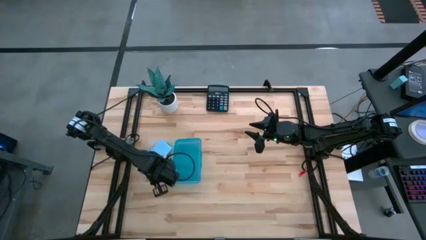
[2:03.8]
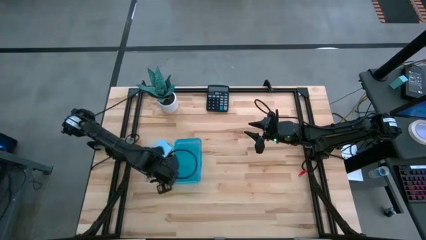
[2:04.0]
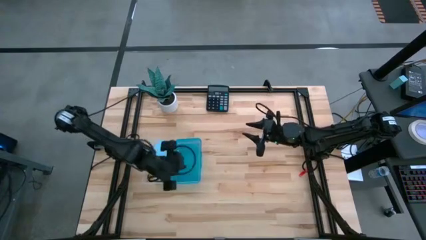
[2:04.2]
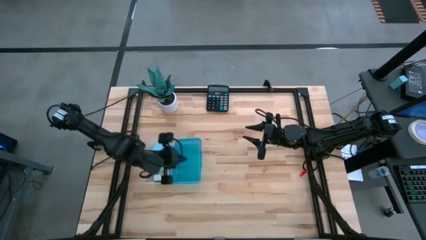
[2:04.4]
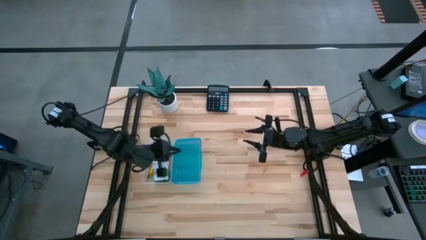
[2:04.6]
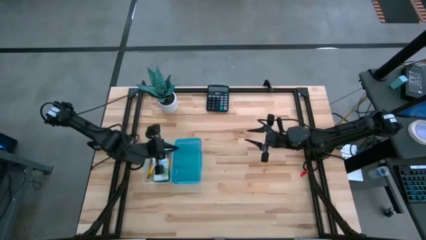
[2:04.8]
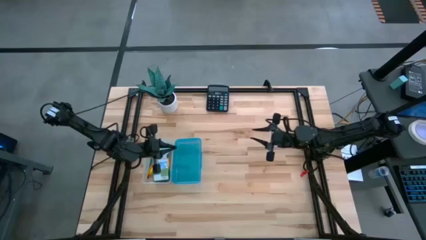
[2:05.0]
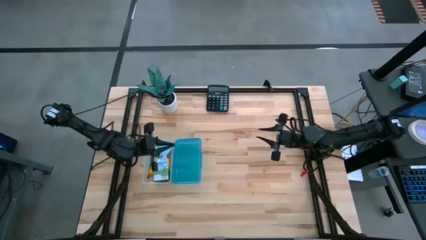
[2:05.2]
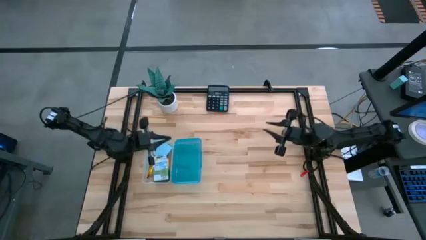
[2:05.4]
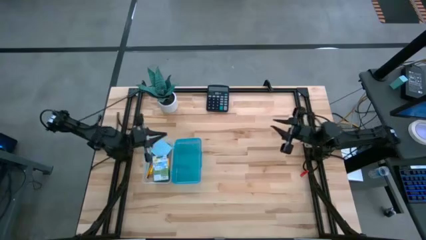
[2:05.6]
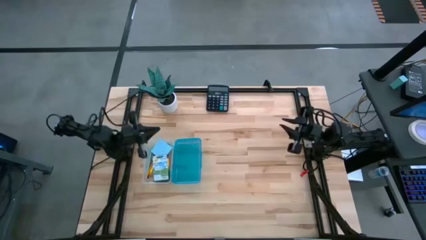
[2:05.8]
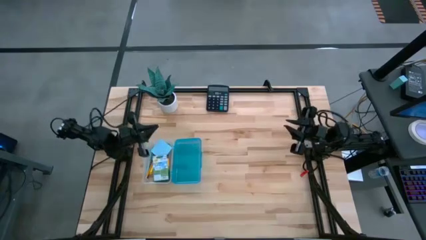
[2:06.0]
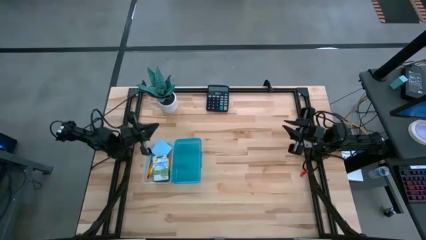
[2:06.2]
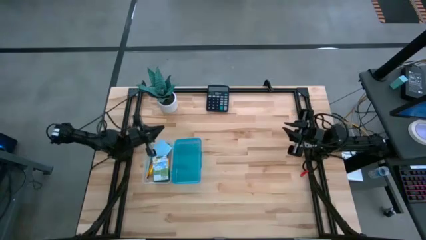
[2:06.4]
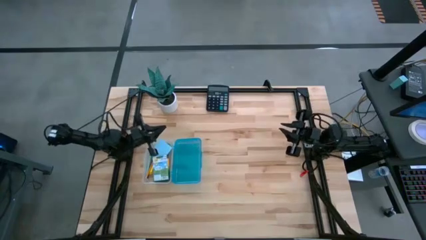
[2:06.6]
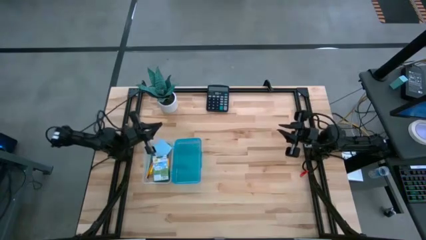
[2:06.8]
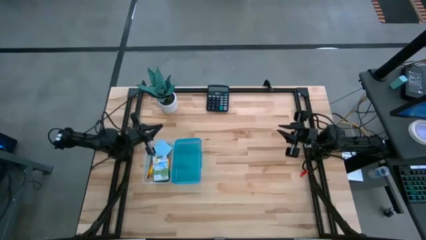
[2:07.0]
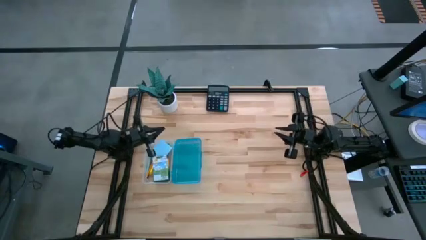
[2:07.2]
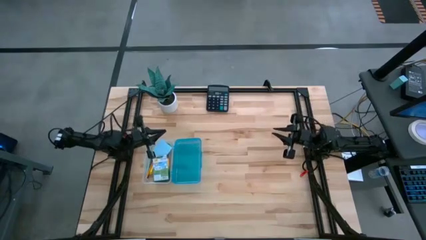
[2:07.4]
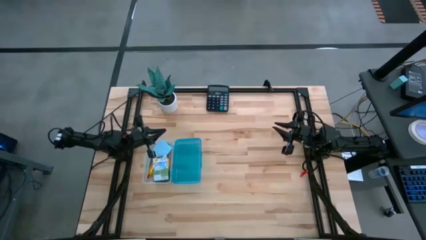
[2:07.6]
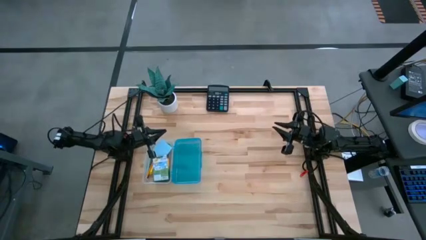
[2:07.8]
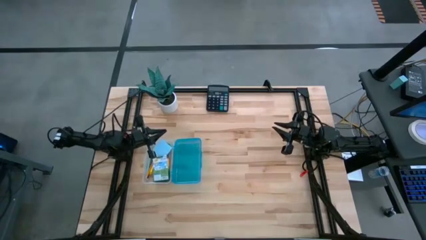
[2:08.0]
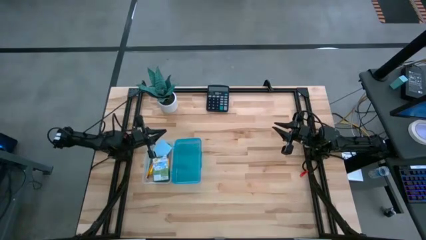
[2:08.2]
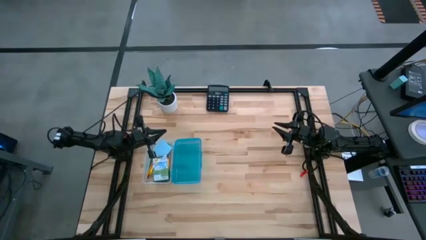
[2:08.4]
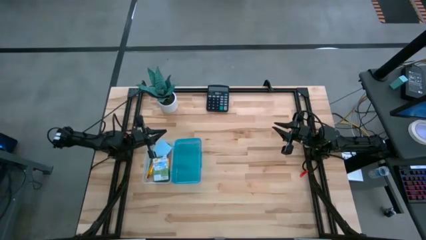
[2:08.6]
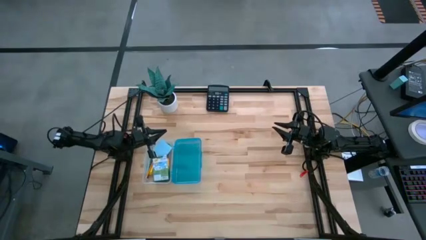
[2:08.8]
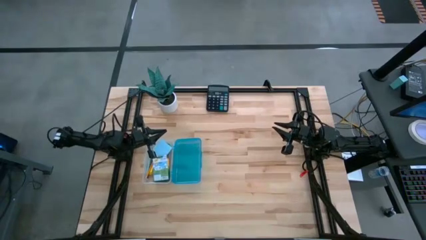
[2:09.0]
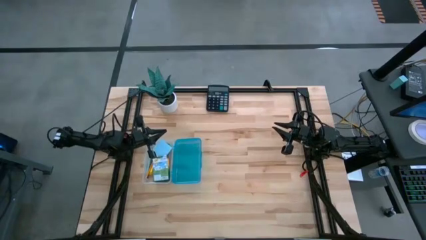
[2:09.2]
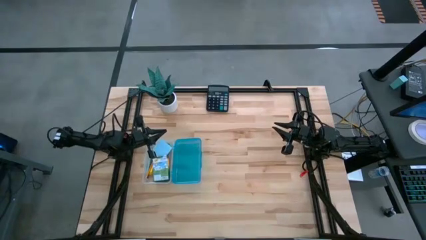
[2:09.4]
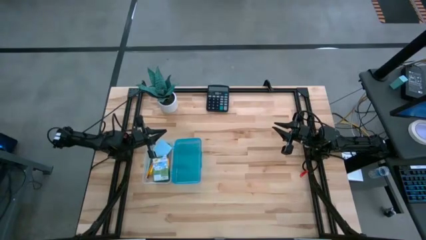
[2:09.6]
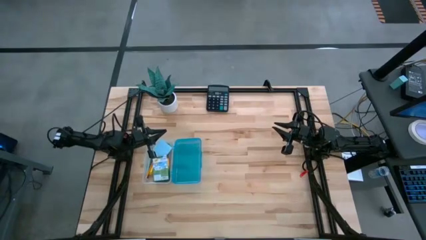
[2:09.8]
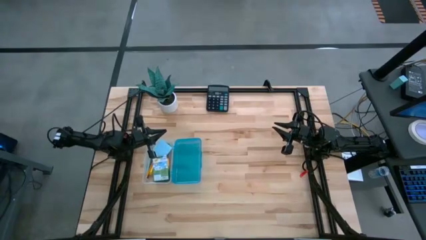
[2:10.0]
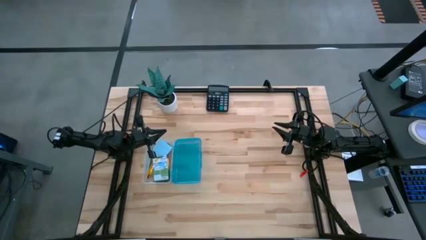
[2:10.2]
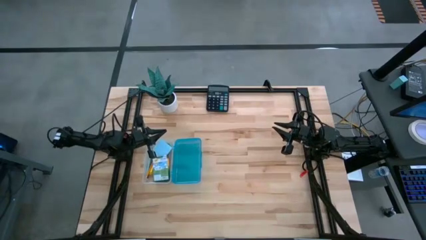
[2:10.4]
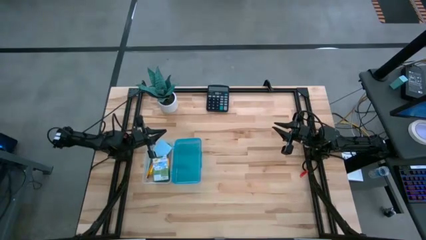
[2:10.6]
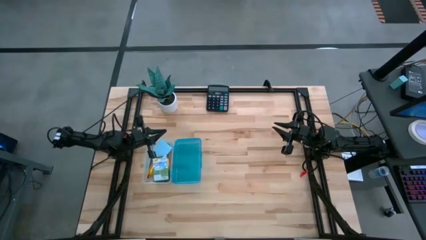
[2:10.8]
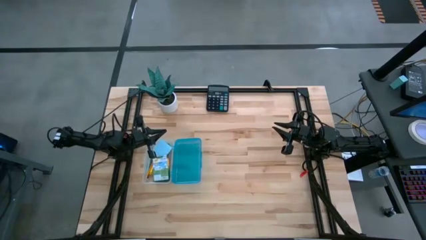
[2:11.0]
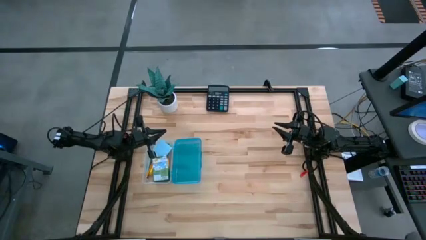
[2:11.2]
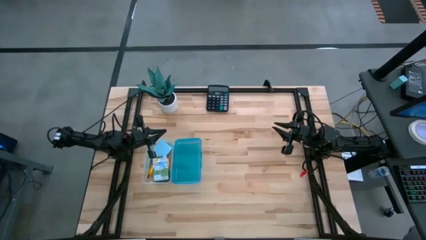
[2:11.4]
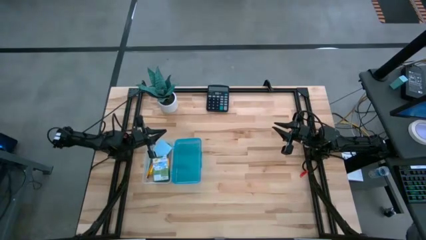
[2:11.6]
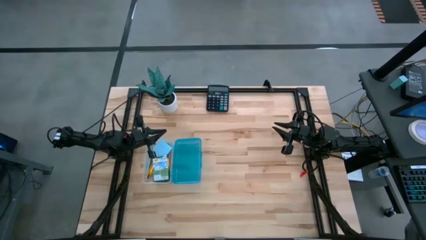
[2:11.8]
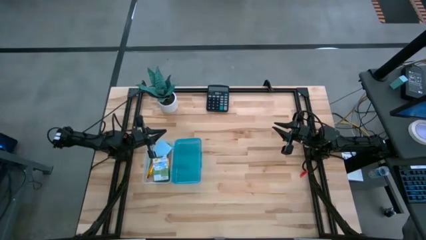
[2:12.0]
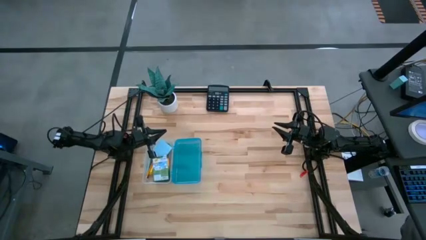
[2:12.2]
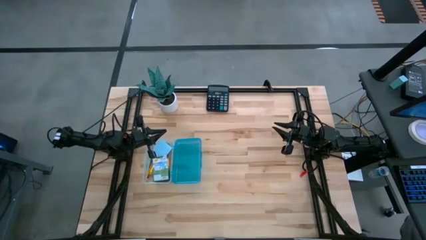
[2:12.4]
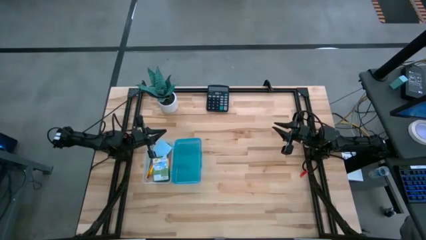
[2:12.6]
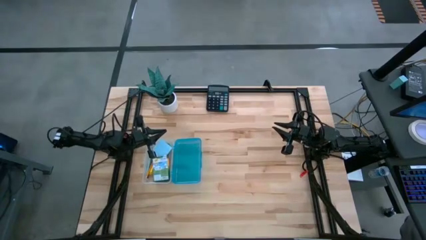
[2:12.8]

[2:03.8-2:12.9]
Task: Pack school essentials
Return to Home Position

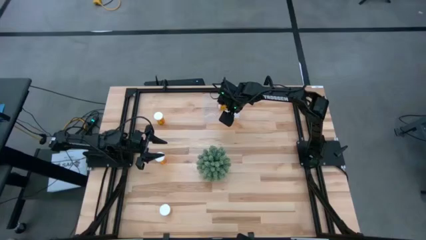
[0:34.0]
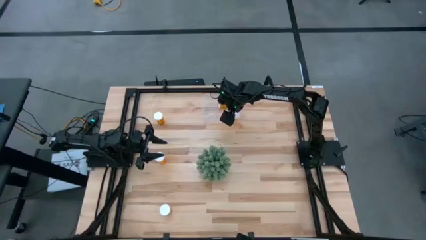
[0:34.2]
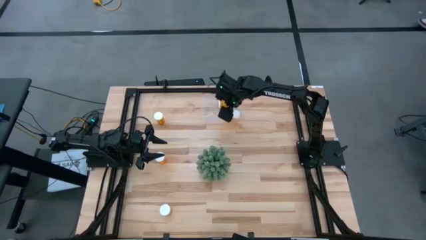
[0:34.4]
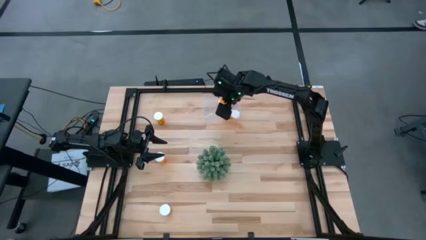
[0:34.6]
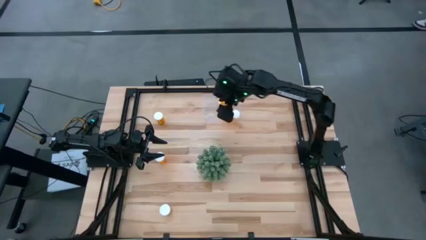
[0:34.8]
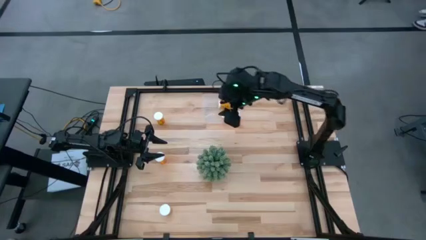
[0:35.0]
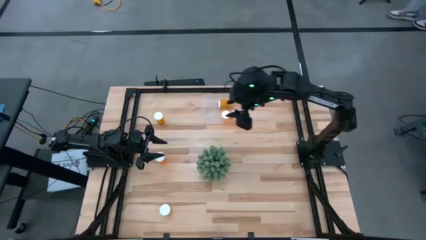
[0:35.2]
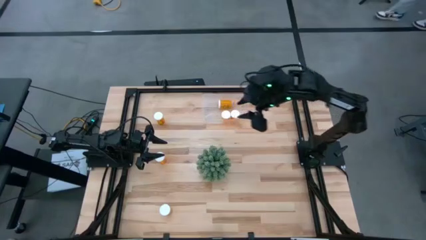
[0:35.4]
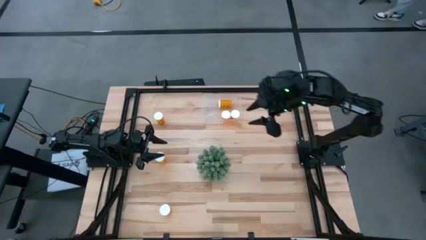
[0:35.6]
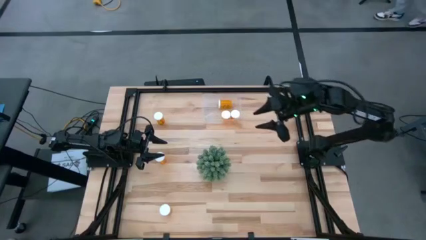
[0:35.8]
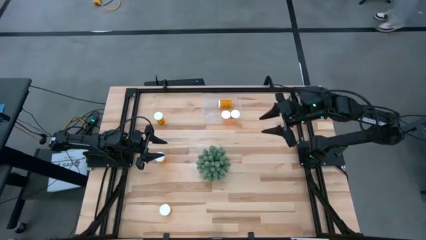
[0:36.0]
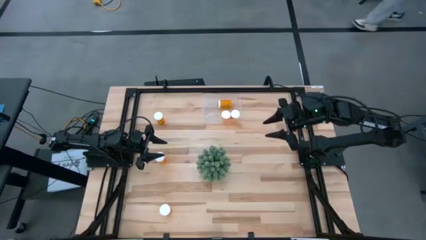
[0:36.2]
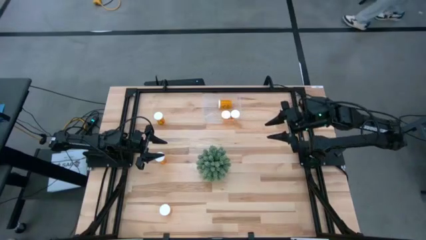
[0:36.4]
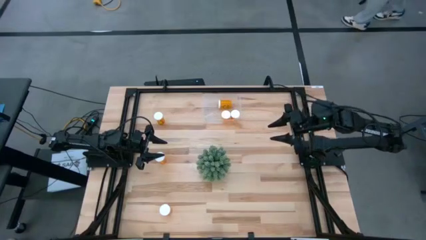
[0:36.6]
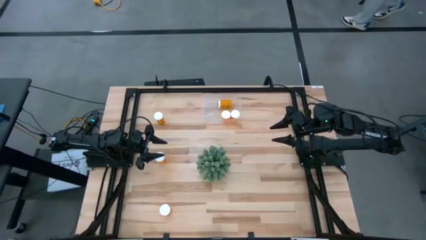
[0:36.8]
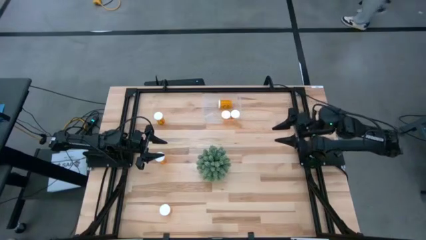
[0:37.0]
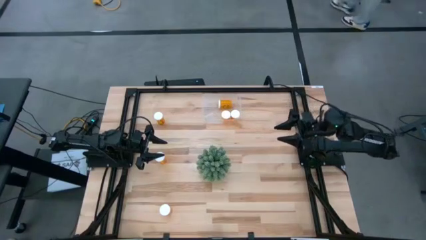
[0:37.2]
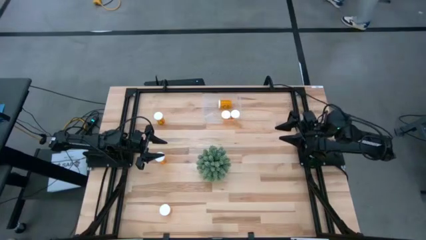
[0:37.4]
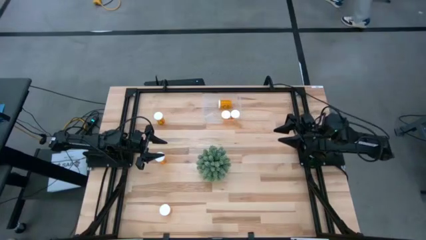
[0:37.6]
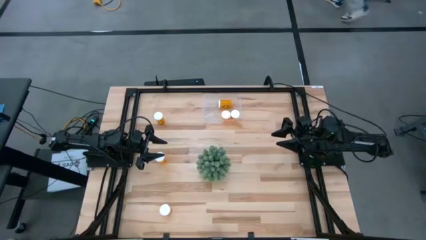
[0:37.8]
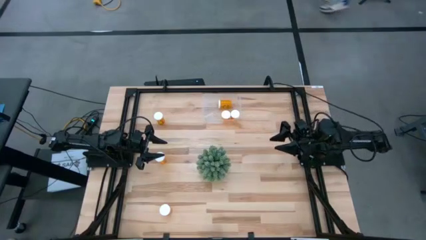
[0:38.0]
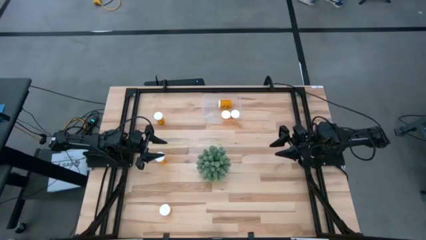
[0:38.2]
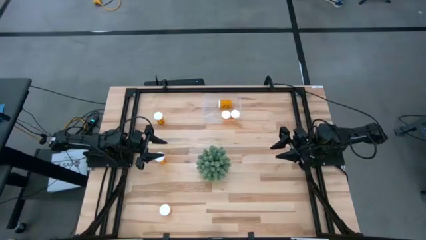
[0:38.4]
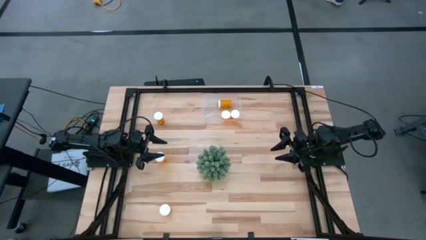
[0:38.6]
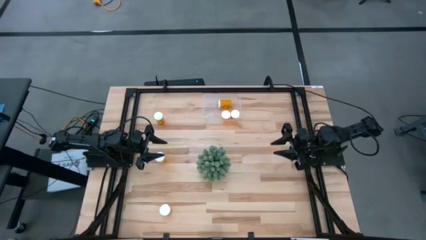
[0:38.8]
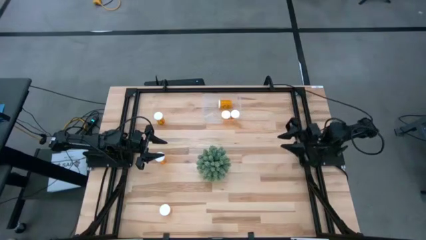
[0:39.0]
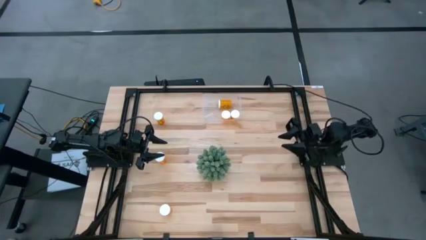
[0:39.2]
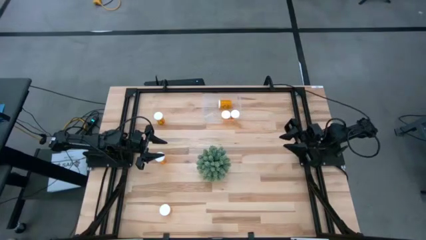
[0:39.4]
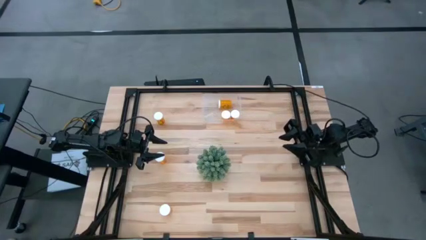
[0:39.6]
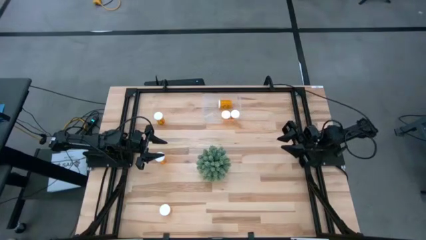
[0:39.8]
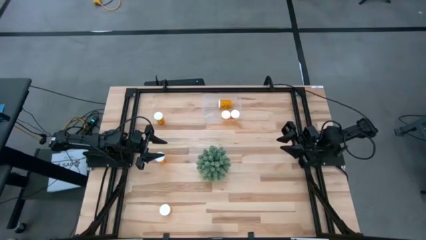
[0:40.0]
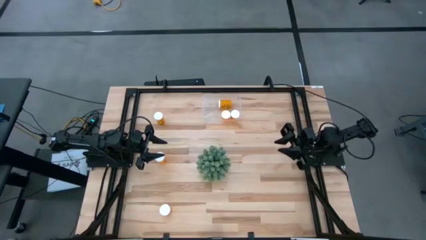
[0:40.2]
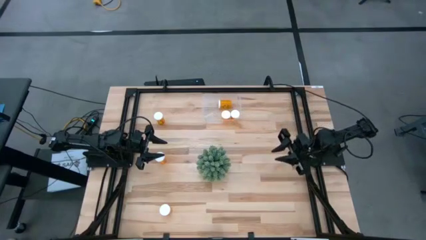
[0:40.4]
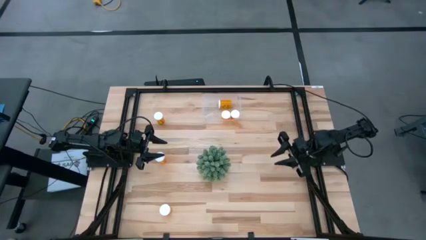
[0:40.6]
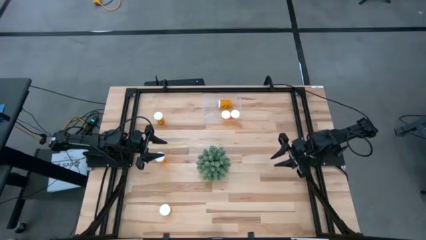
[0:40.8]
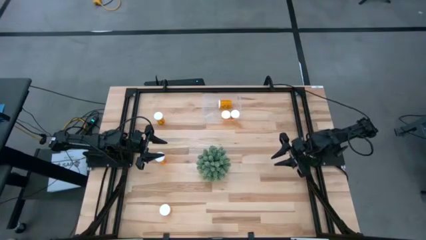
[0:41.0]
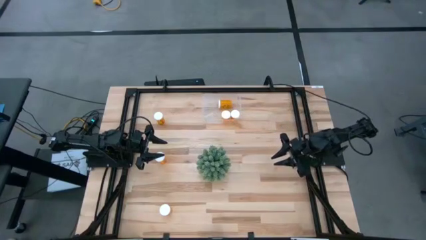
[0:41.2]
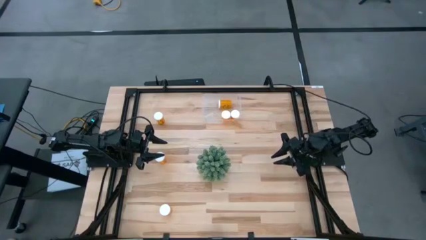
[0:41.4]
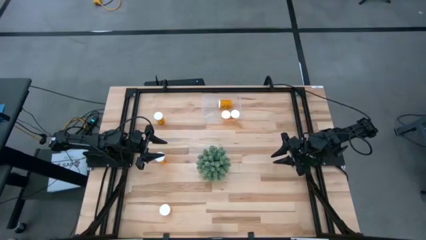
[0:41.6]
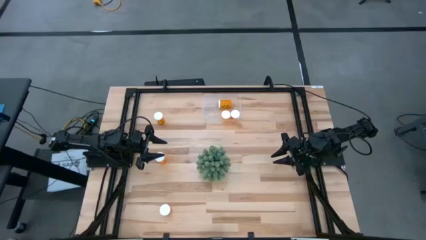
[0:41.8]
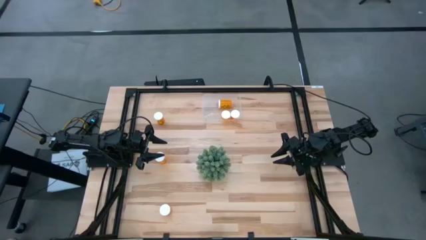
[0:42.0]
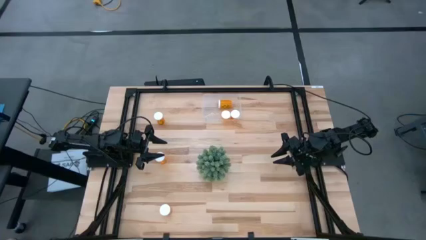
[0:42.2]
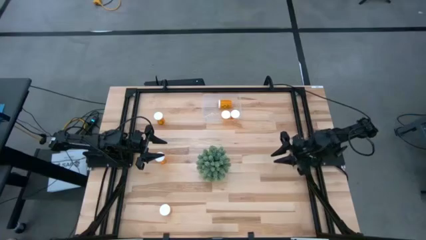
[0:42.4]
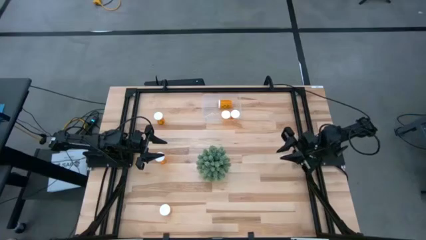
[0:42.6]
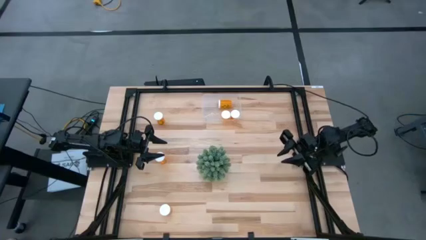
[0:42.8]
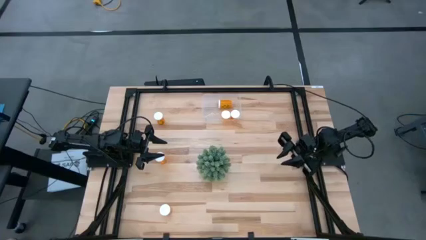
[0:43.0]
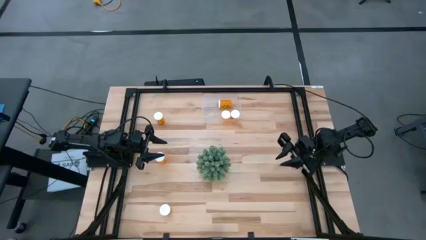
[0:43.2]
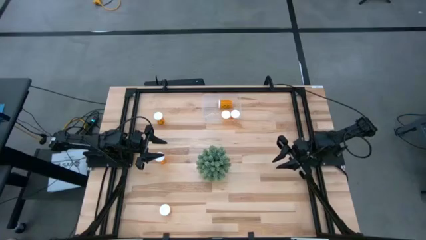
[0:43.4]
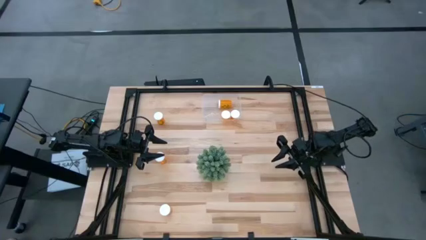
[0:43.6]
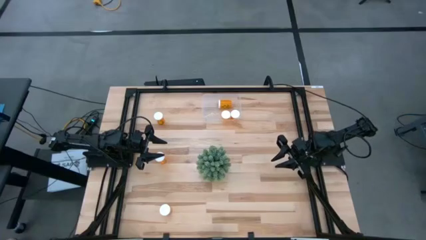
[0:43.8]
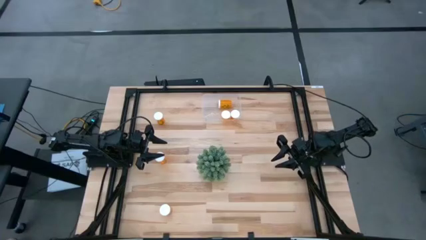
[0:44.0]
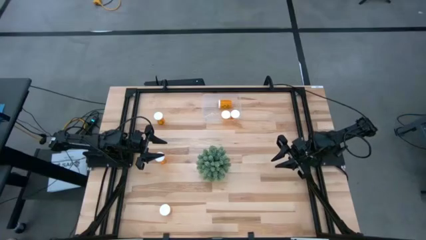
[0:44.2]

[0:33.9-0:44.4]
Task: Pick and place pill bottles into a basket
Put the orange pill bottle into the transparent bin
